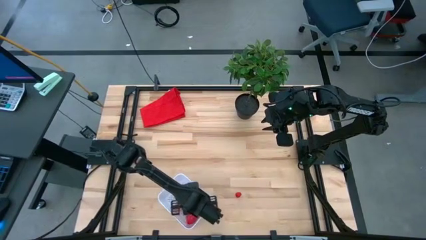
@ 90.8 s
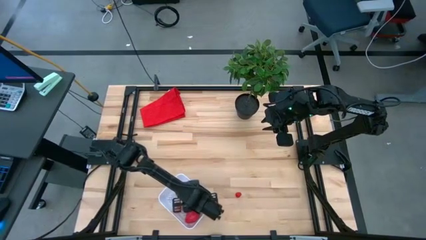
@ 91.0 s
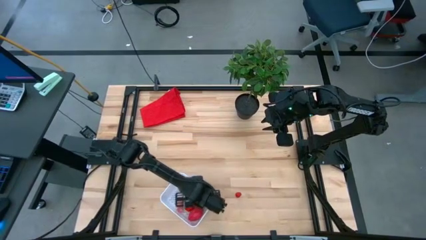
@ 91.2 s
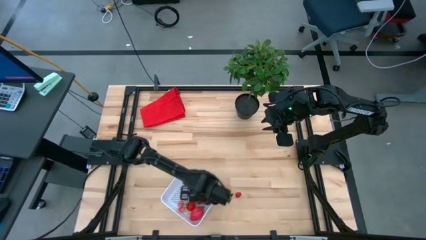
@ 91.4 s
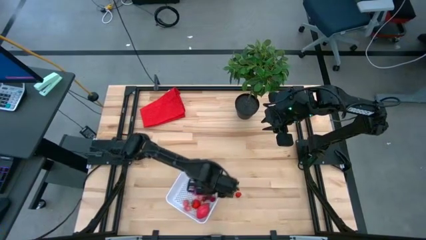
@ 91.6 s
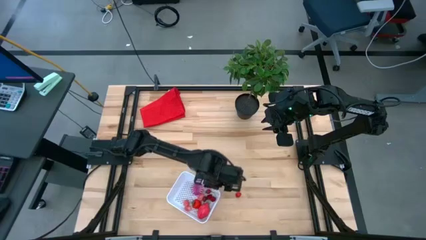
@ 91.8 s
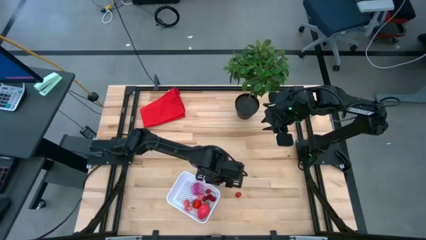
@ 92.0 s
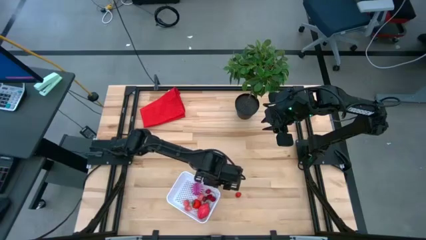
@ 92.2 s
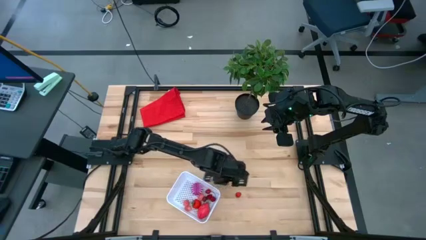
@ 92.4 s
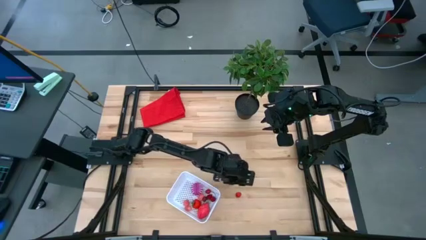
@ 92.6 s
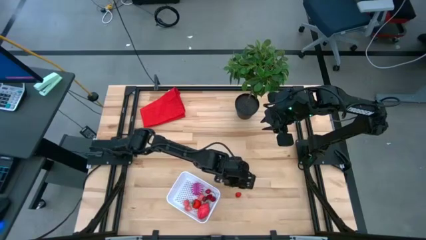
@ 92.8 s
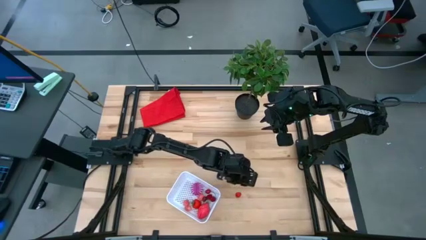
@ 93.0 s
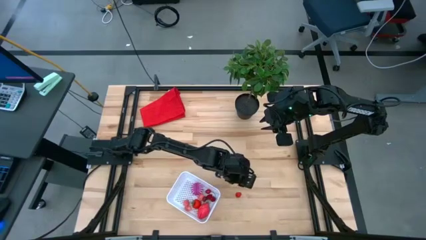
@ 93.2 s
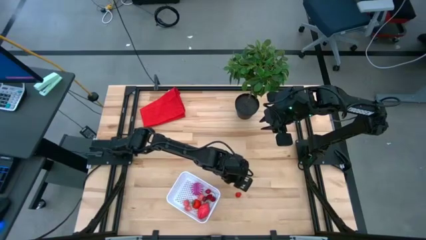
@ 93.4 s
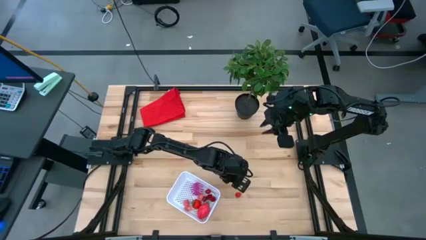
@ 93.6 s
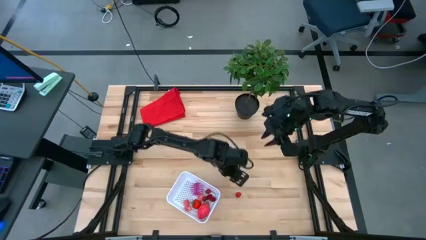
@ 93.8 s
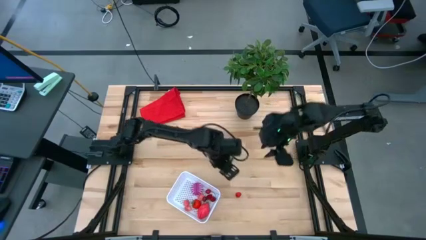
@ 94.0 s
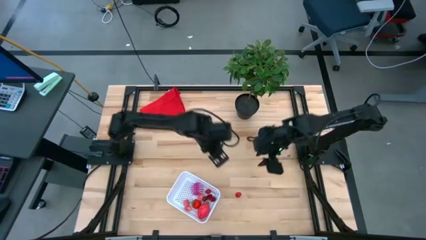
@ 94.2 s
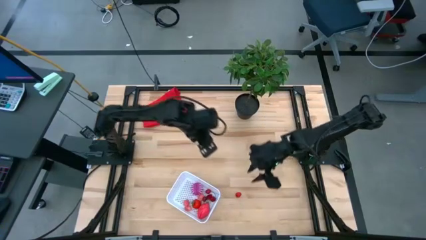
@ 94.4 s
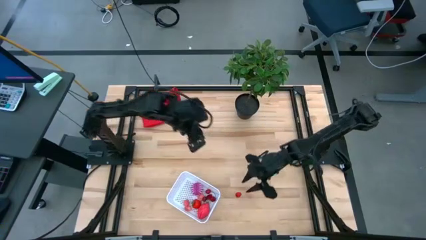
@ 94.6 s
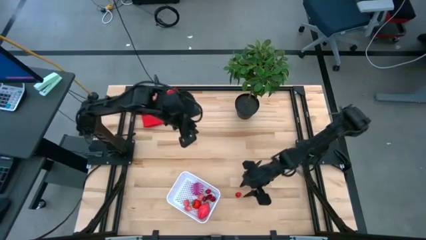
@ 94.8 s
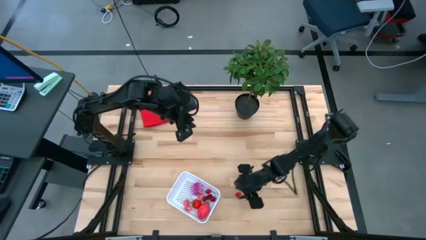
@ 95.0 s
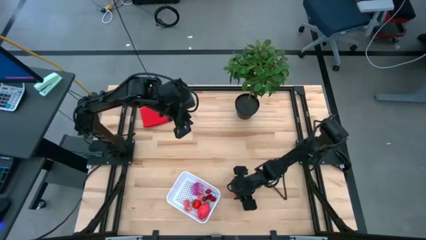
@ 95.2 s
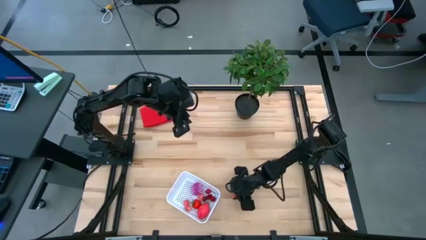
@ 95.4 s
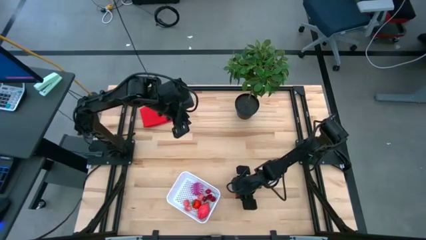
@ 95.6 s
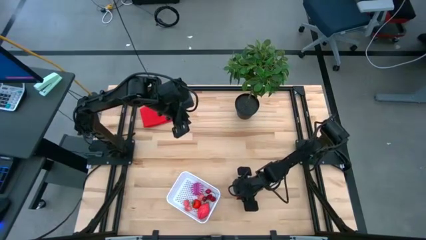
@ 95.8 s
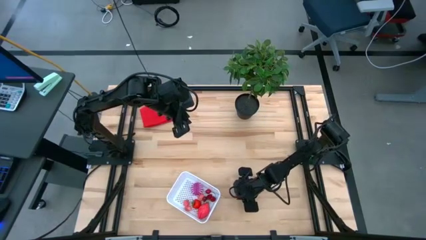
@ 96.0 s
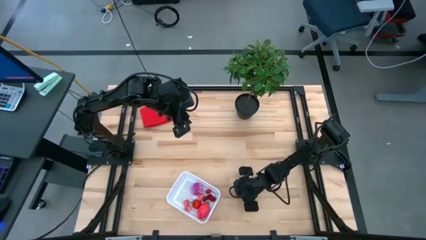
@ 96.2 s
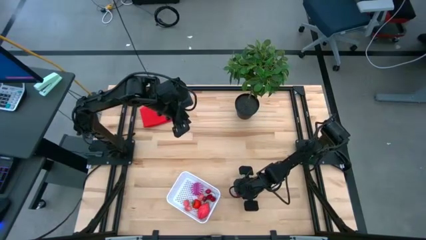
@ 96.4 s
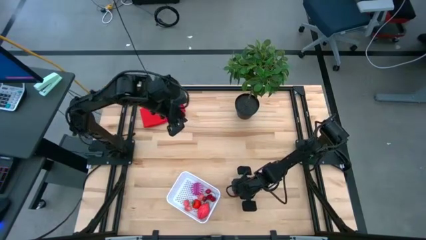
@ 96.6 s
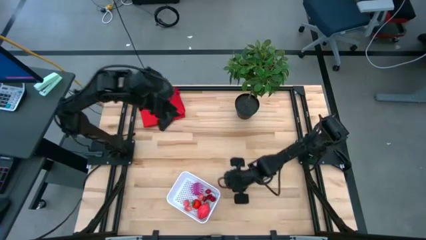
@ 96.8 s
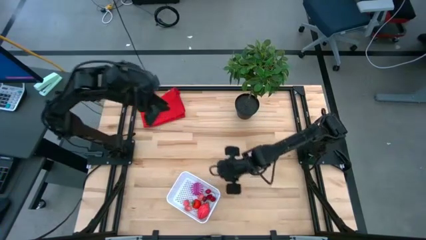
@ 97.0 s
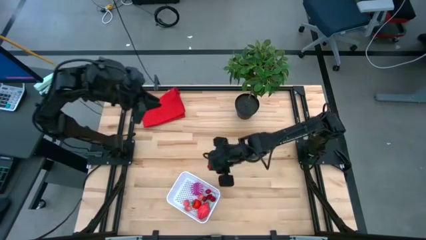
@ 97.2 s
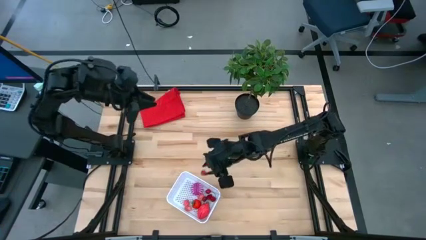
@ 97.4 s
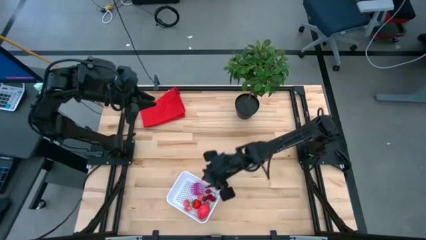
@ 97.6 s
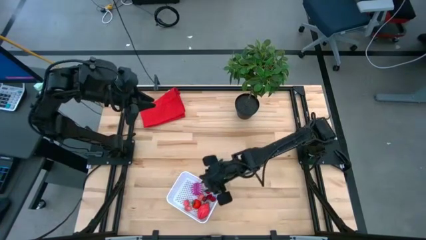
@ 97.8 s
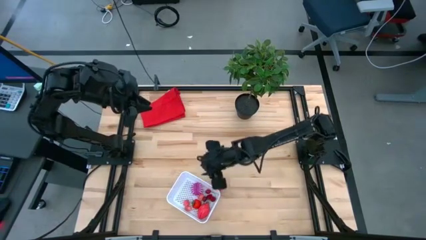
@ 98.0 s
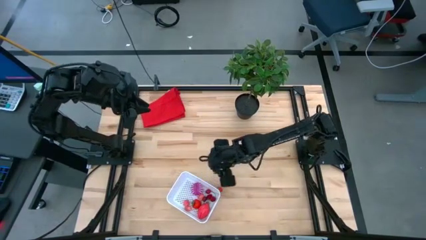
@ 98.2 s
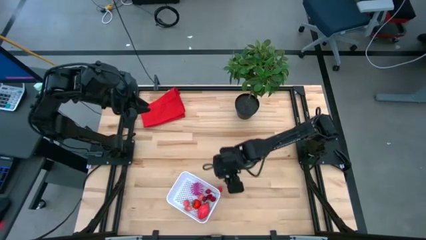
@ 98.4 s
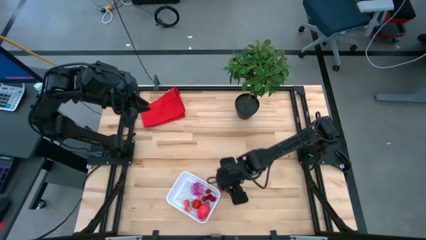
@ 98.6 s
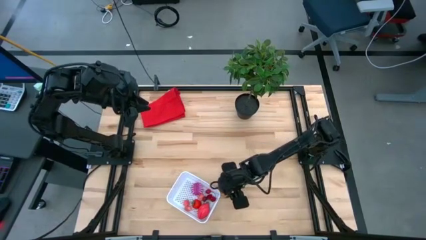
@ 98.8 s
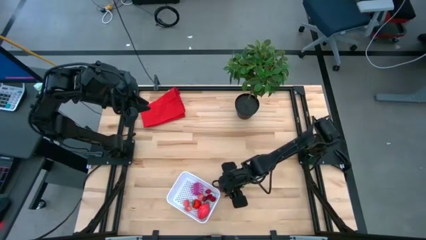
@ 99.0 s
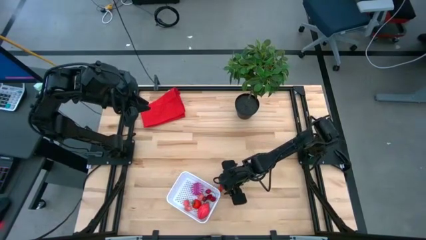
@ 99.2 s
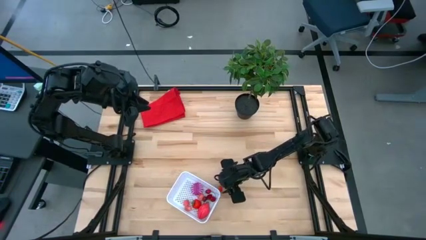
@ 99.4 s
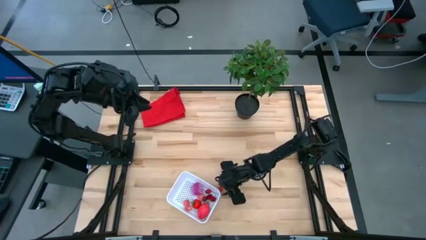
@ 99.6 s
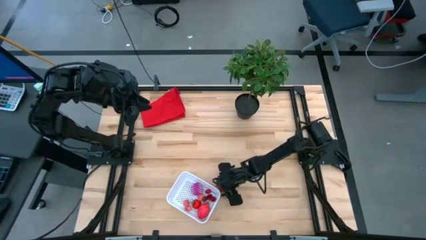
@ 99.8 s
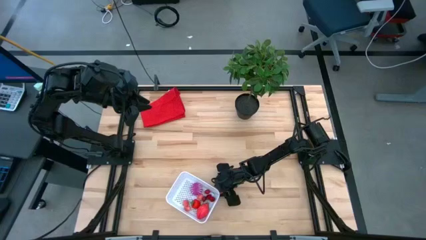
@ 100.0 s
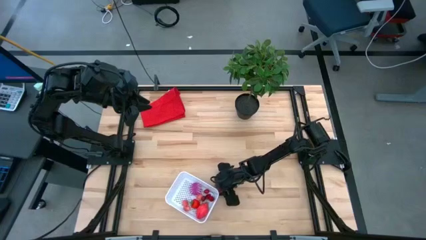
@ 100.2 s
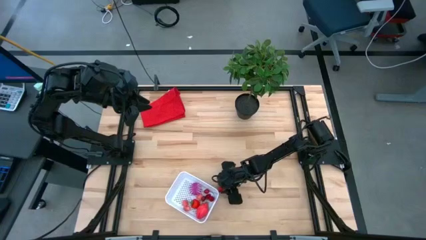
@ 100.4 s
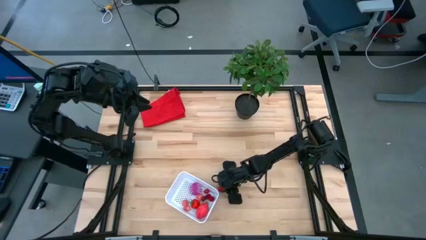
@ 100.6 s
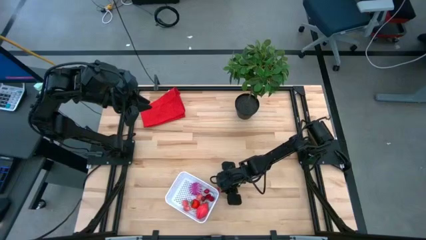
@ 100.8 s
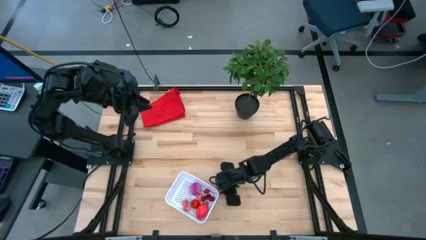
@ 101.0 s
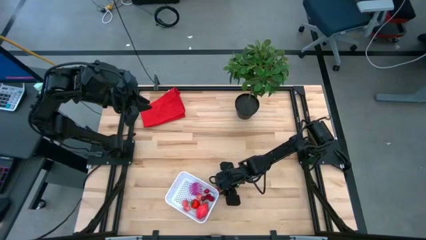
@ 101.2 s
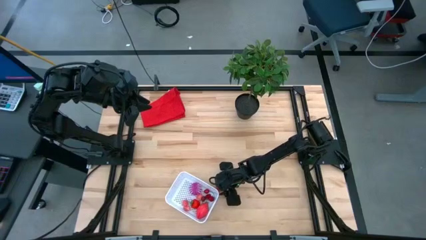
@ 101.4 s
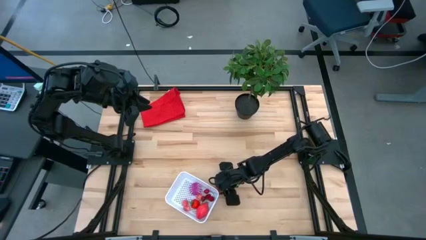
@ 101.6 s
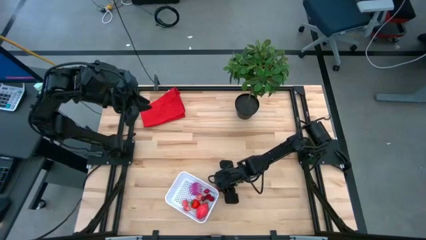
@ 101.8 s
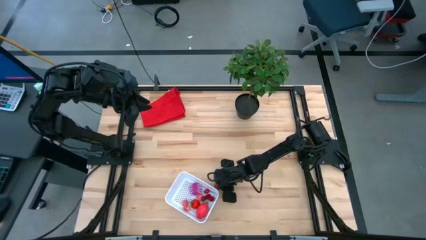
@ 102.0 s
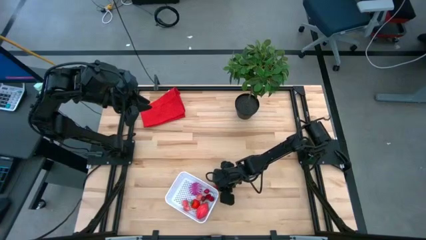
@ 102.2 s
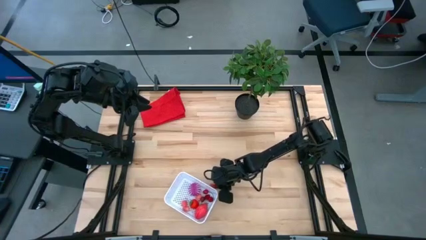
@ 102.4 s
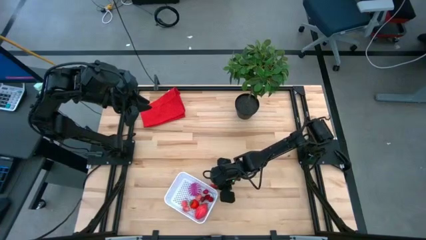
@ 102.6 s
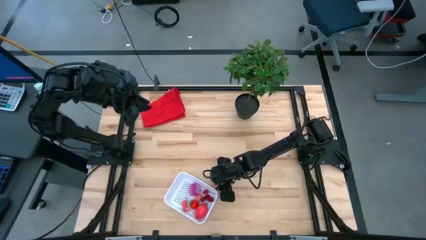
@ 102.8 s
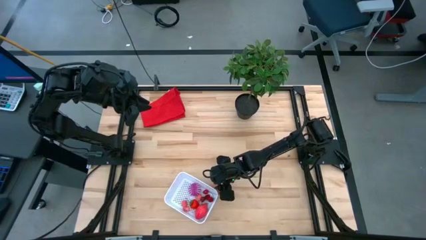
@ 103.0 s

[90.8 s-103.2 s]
Task: Pick and placing Produce into tupperware
Put the raspberry in the basket

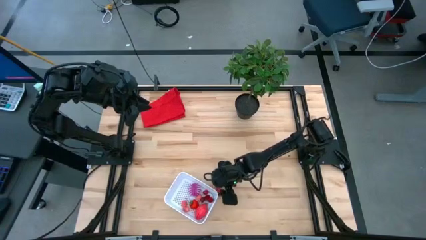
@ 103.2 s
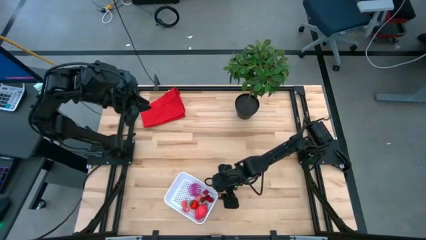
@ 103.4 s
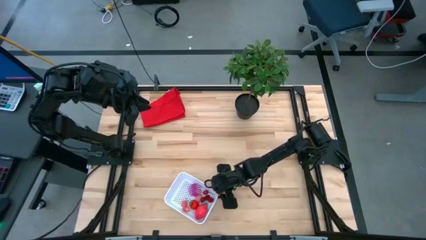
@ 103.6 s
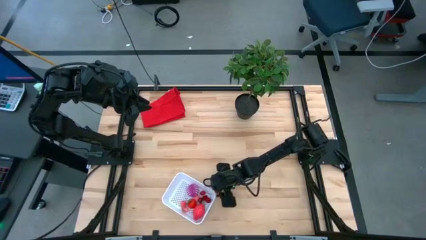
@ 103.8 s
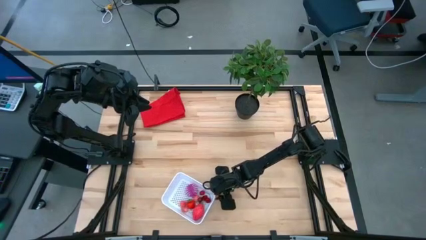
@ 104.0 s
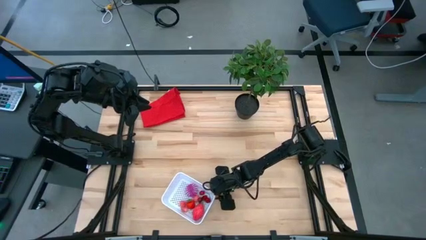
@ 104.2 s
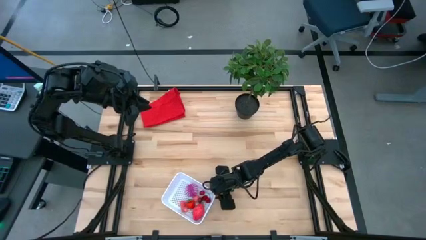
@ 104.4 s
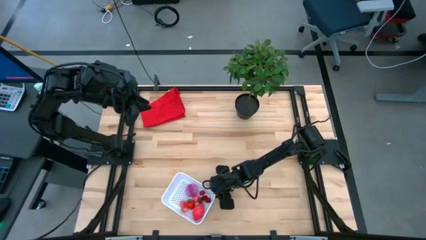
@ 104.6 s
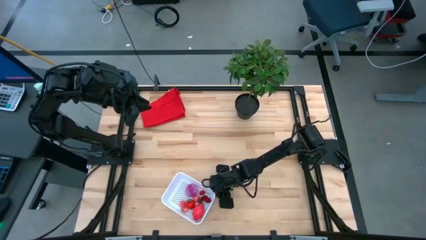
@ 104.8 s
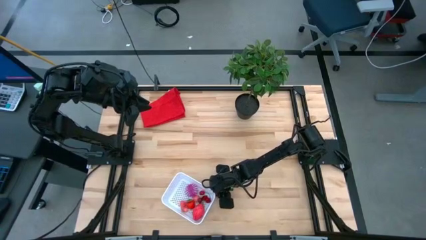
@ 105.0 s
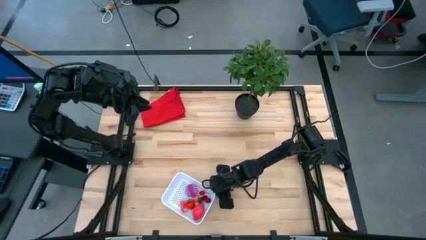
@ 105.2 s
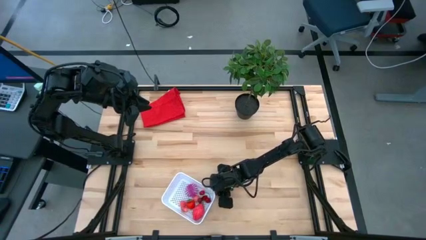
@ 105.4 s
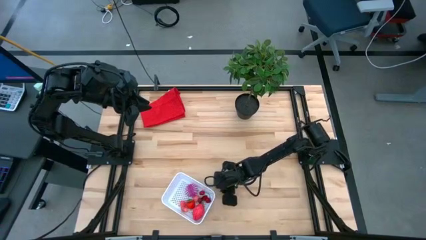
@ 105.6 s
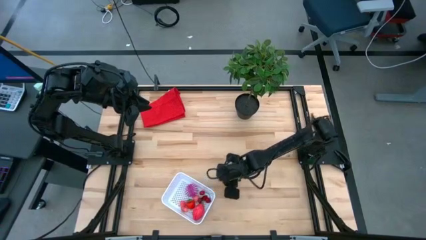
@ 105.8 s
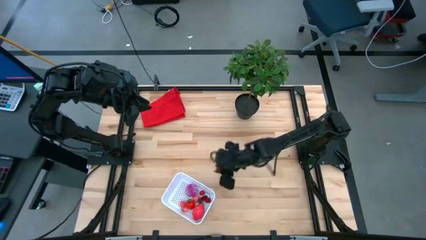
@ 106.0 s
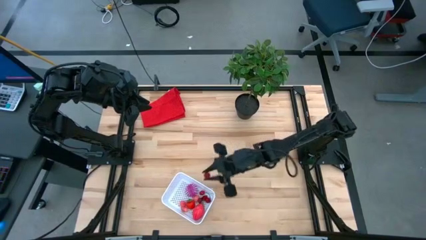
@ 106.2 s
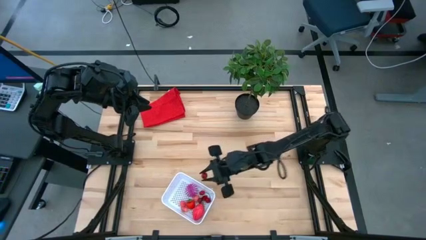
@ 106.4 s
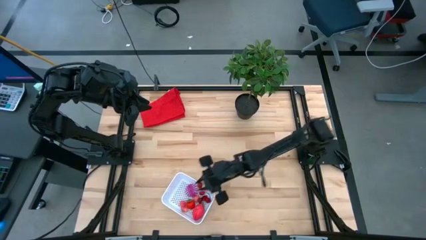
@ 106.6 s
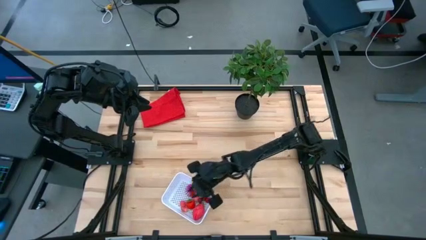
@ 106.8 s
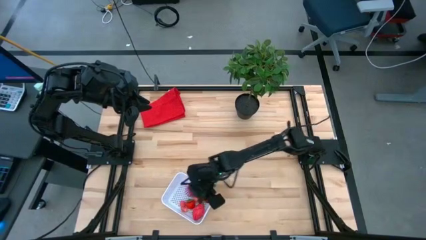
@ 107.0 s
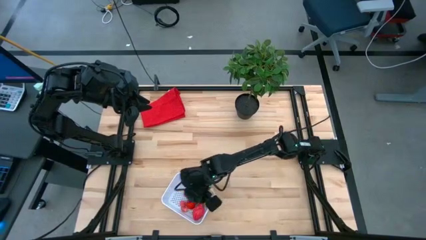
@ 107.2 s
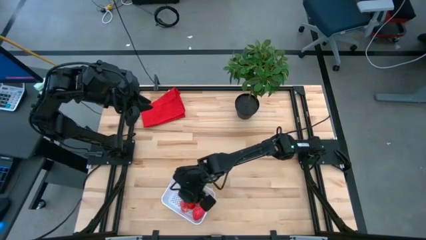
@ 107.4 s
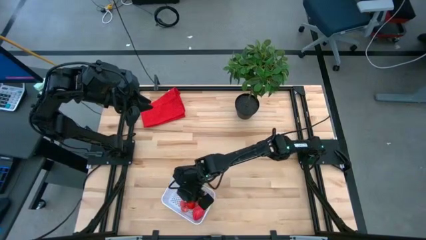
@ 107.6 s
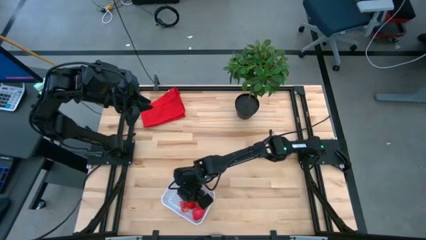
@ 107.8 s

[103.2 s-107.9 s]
Put the raspberry in the basket
